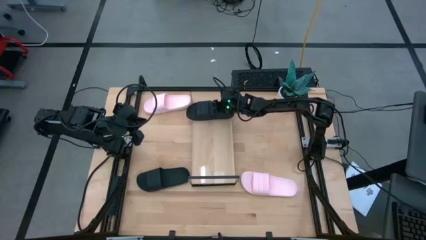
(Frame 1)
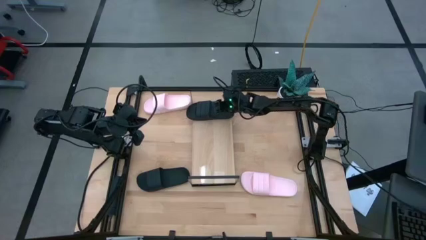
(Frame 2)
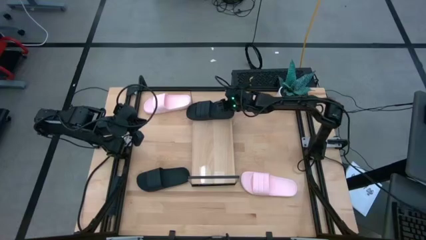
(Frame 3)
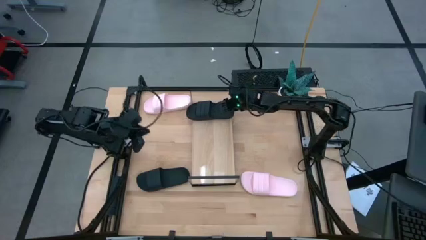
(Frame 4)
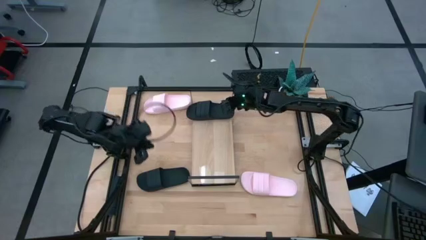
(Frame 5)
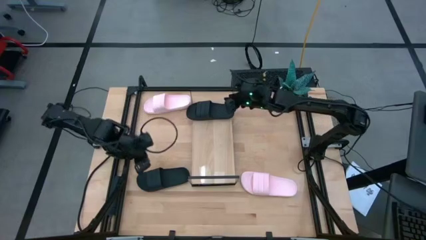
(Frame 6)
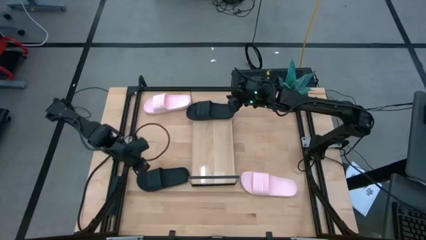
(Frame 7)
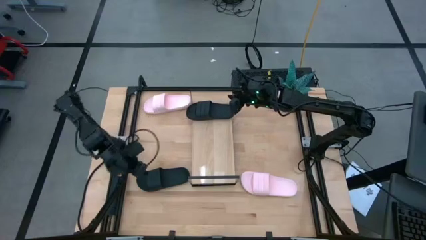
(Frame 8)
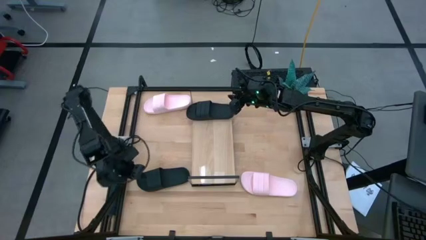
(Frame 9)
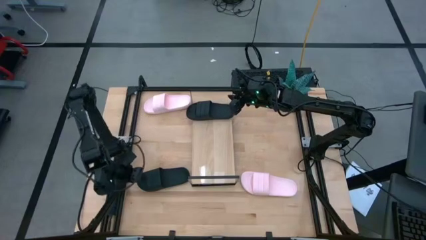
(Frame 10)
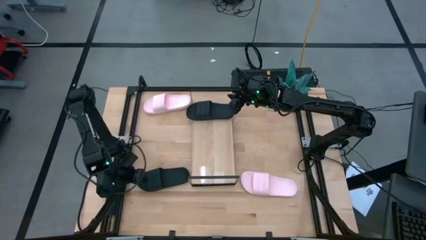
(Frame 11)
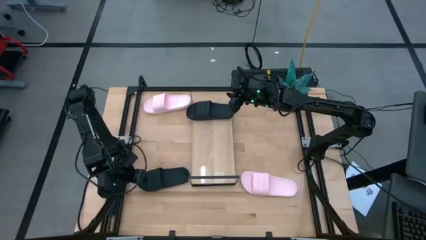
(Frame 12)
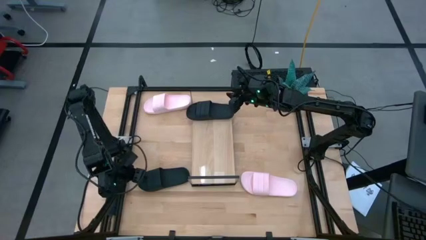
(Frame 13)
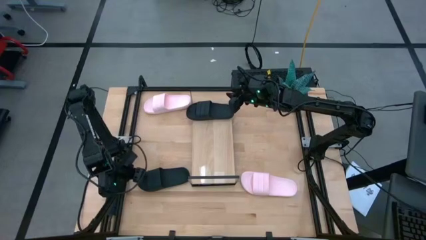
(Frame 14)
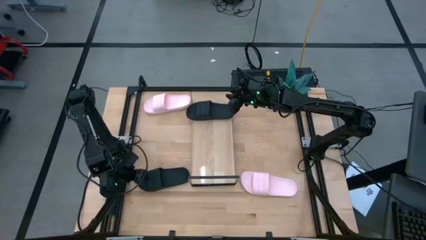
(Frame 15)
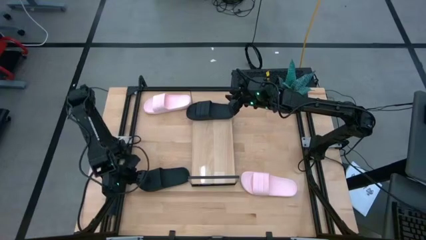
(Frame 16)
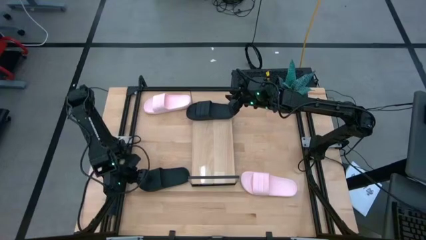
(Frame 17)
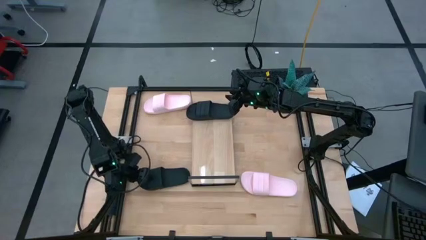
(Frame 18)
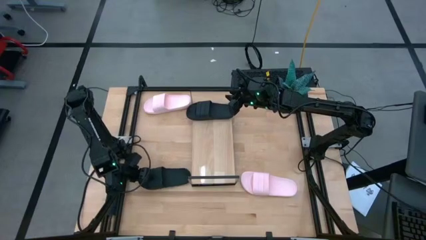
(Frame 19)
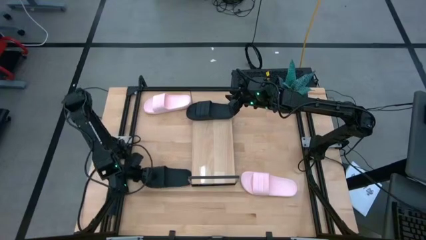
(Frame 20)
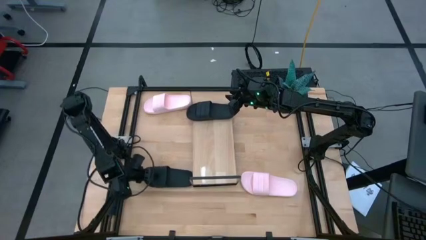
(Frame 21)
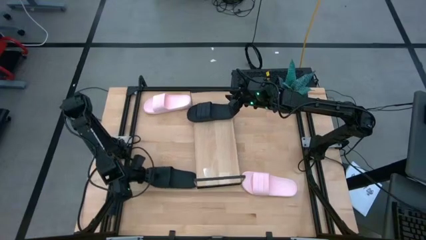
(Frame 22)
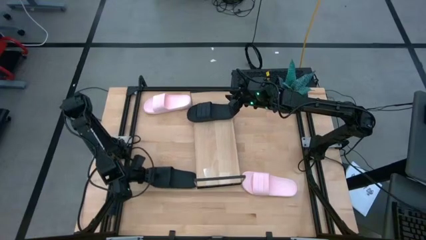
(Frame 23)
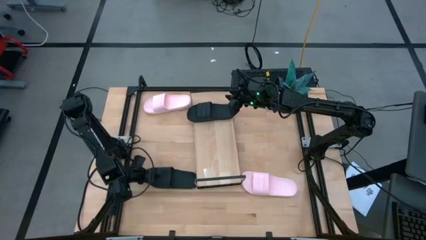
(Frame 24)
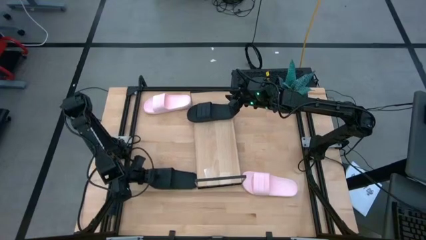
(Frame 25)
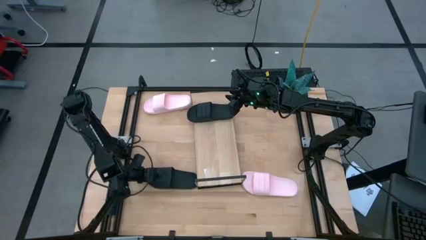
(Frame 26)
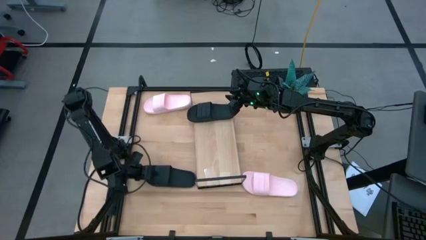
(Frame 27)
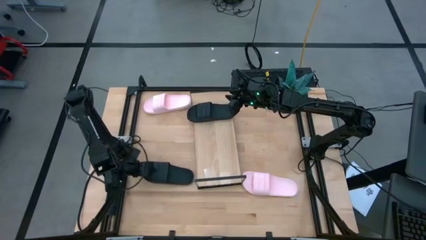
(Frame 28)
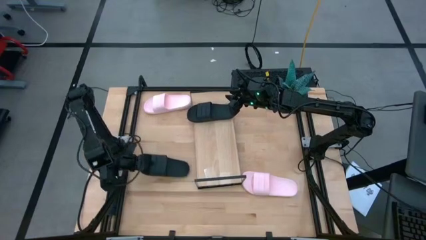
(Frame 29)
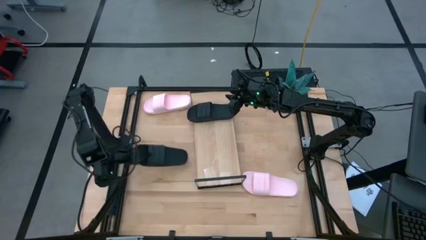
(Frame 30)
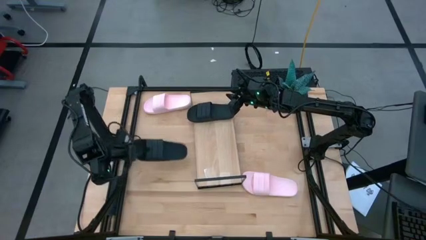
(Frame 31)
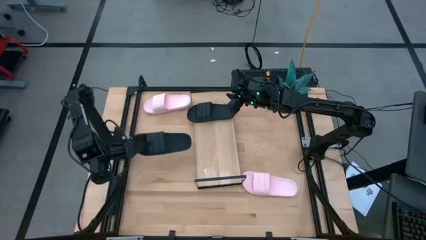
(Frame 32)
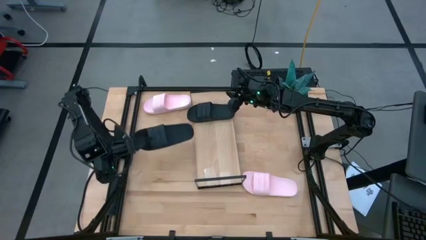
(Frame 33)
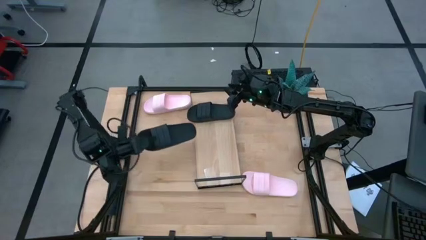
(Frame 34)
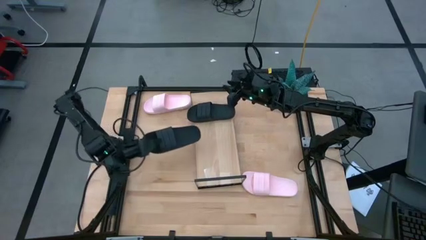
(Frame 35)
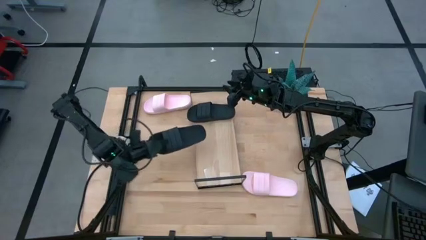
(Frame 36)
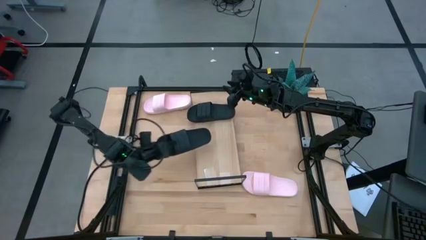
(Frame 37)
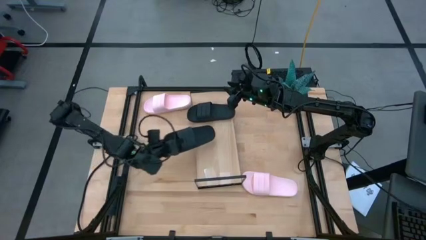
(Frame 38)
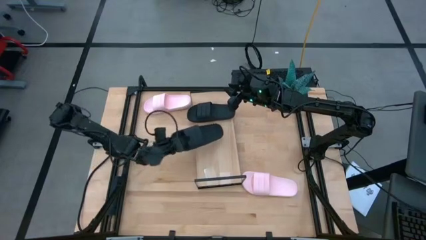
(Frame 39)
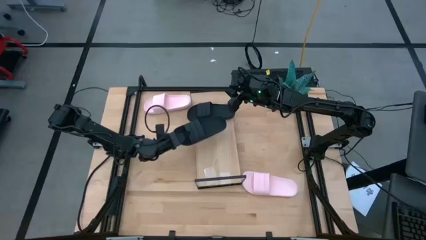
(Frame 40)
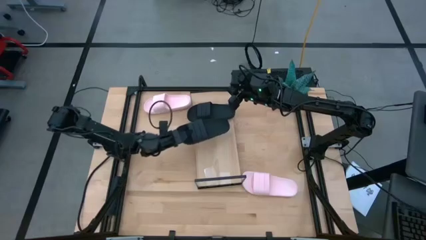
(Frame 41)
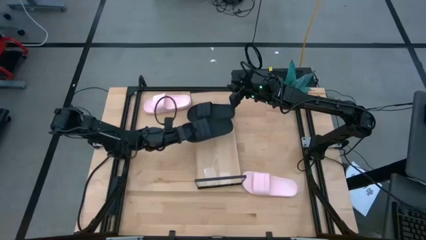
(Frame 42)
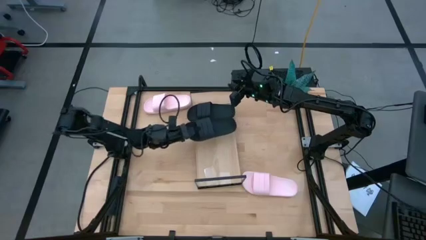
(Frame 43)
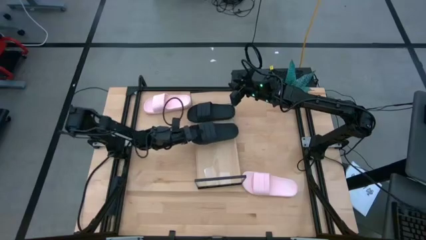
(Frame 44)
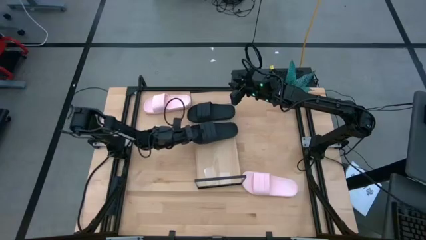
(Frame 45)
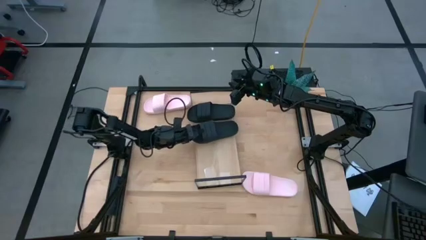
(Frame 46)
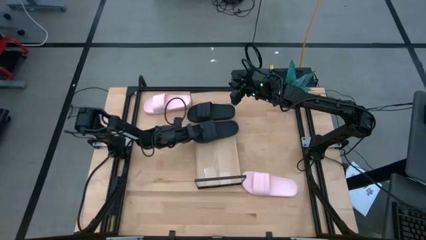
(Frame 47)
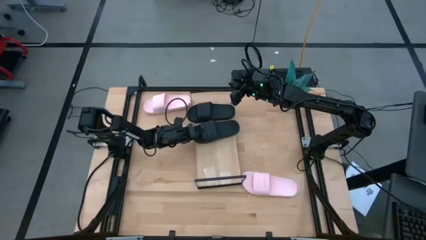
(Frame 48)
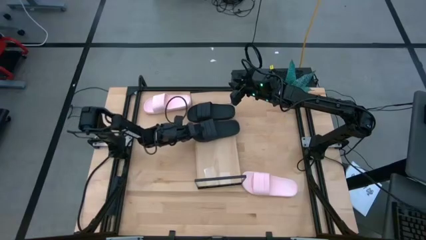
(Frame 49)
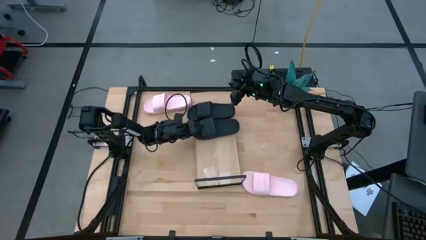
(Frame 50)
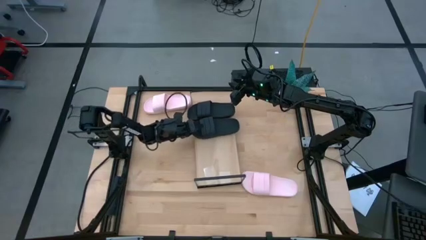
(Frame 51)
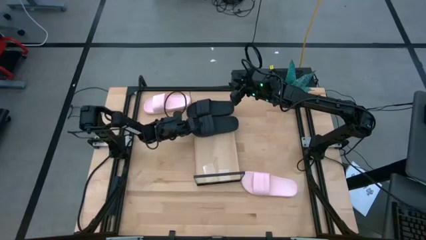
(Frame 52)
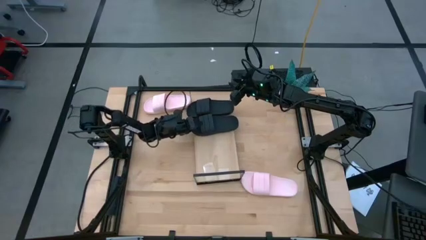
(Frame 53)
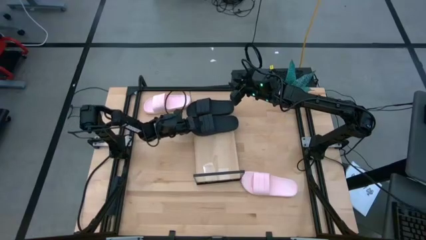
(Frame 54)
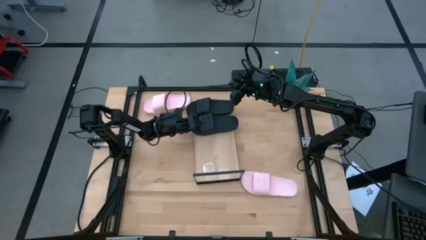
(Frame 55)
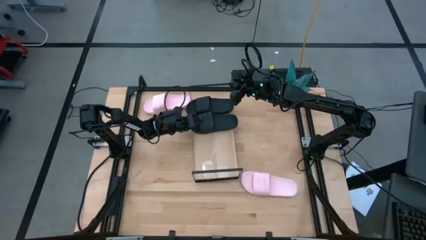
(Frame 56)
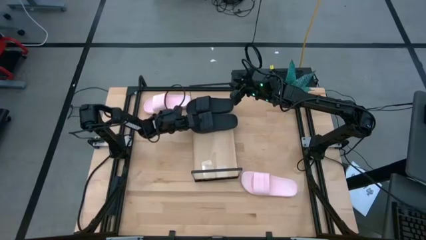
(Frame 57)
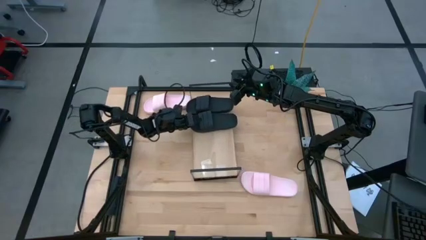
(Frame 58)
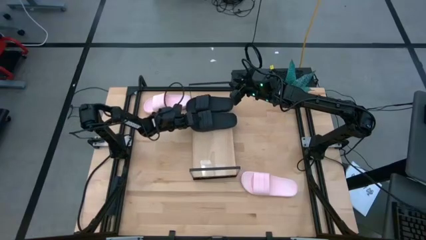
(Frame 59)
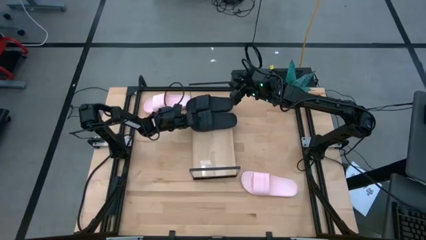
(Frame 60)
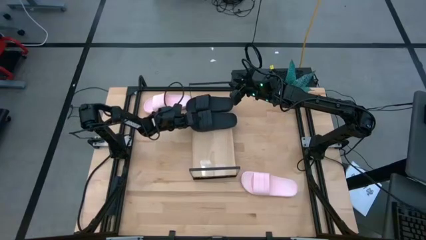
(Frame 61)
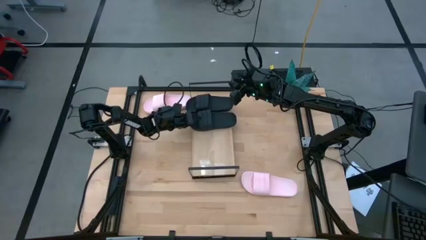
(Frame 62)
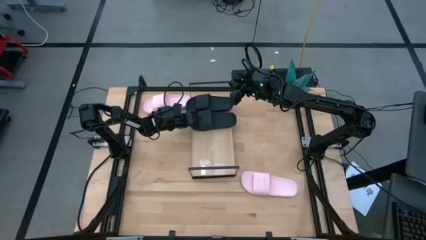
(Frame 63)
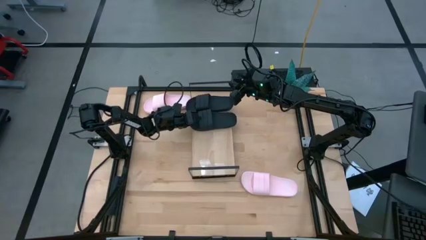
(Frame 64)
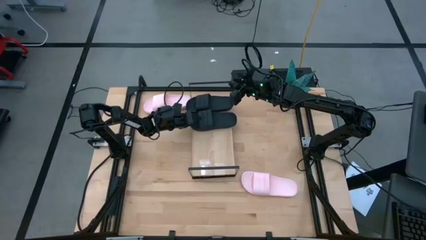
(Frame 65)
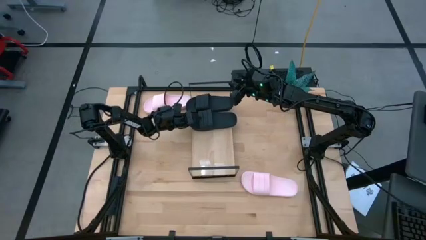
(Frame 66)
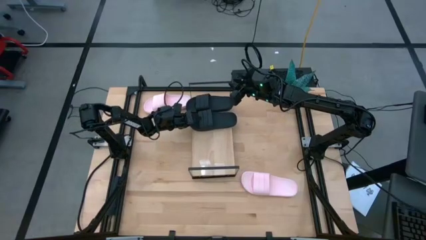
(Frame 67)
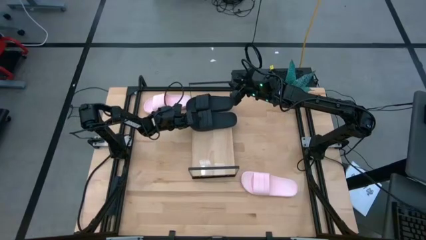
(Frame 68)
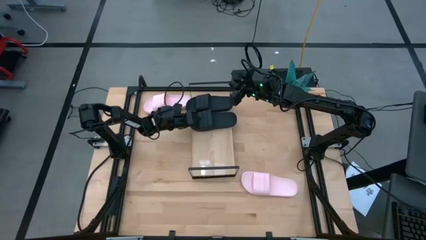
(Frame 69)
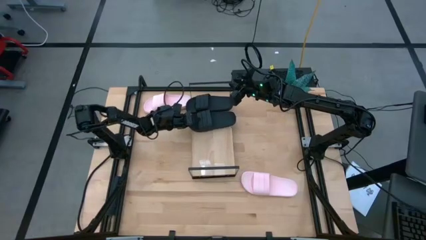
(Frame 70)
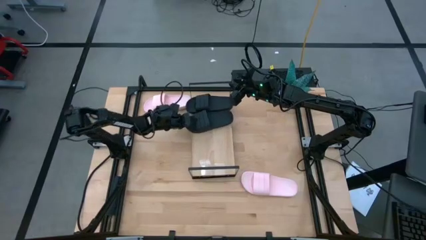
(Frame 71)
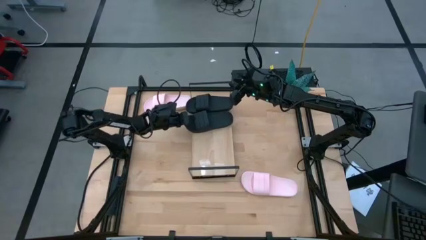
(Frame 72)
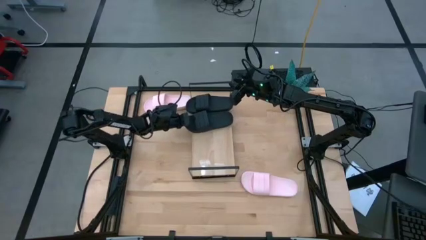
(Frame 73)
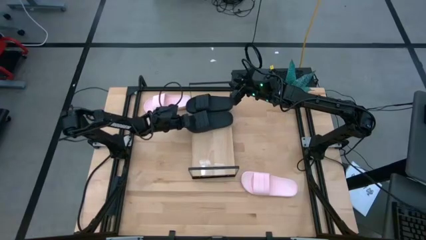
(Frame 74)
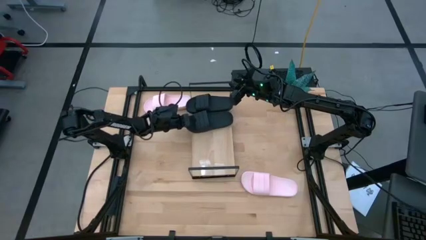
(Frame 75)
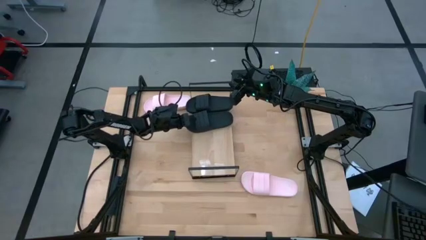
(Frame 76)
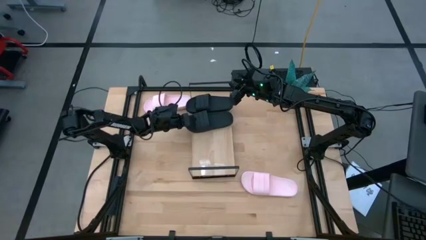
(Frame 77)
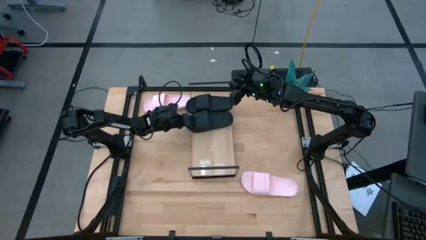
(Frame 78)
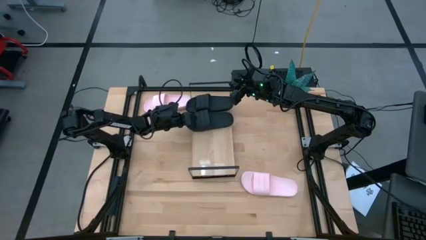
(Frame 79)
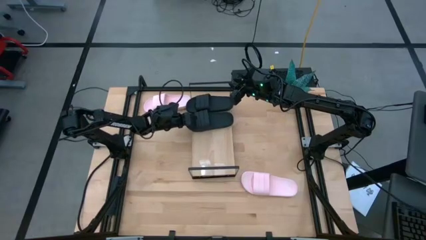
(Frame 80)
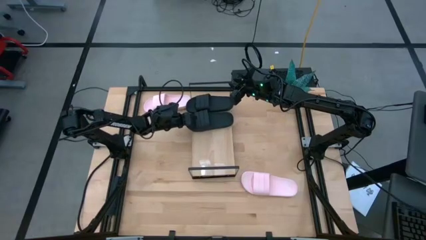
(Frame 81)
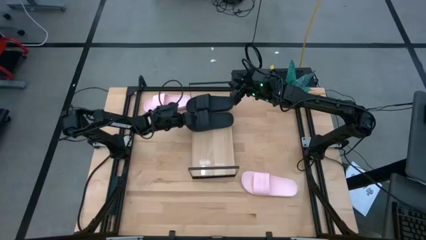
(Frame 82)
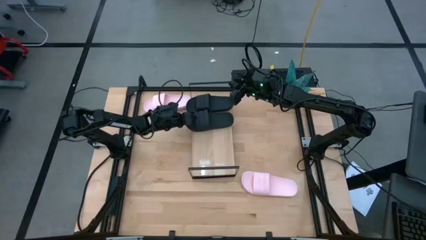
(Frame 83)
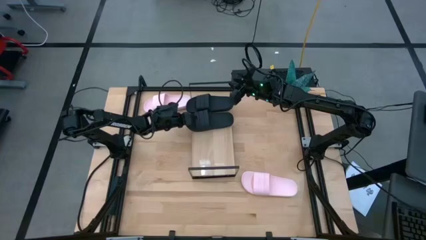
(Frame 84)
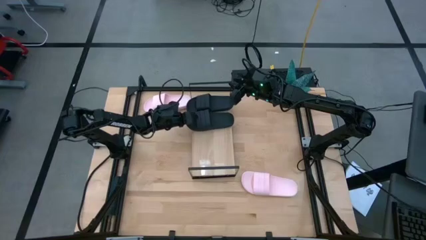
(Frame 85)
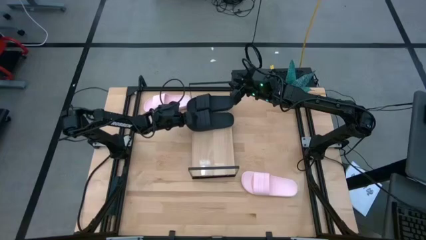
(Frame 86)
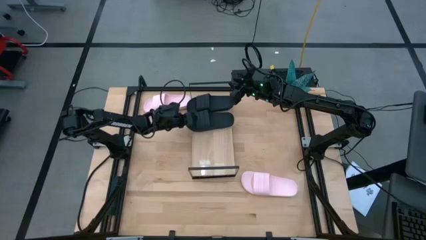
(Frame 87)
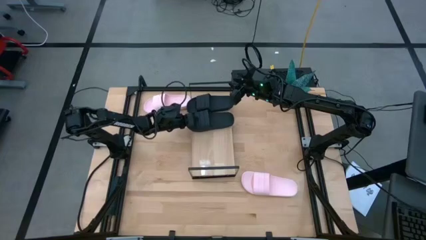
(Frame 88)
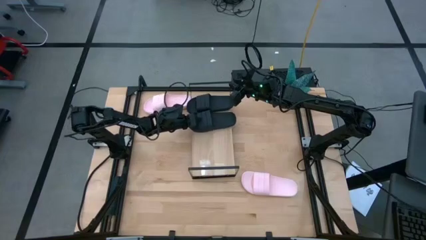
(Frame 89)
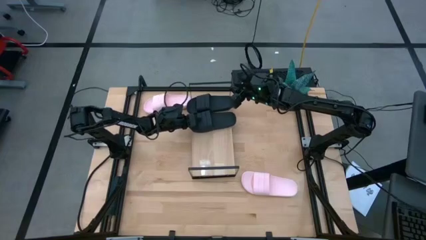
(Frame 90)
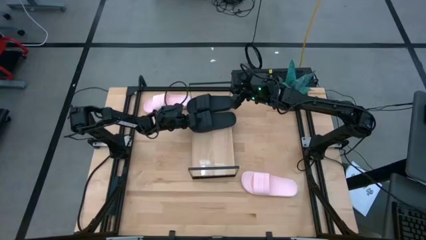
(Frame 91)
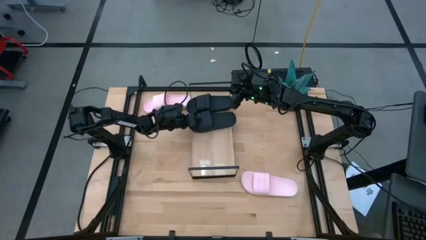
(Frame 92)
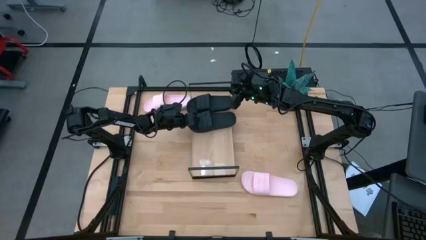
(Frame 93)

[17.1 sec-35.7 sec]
Task: Pick and place slides into the shelf
Put the black slipper on the shelf
